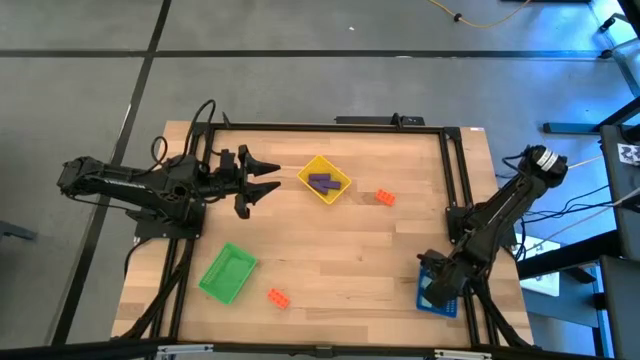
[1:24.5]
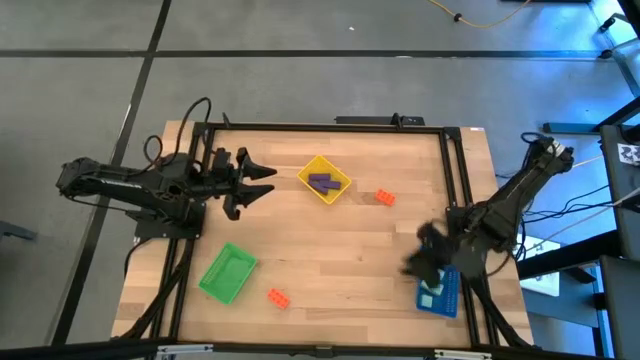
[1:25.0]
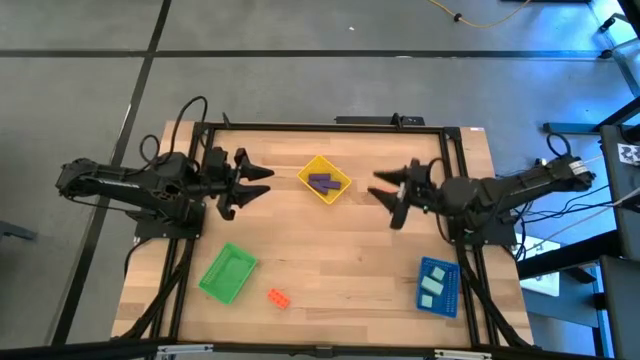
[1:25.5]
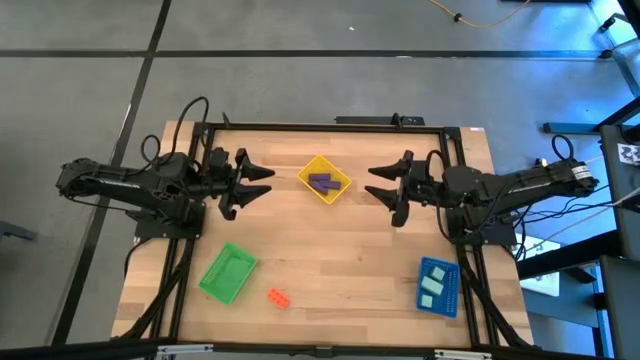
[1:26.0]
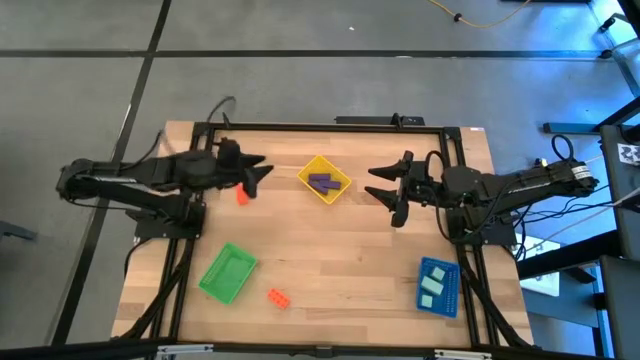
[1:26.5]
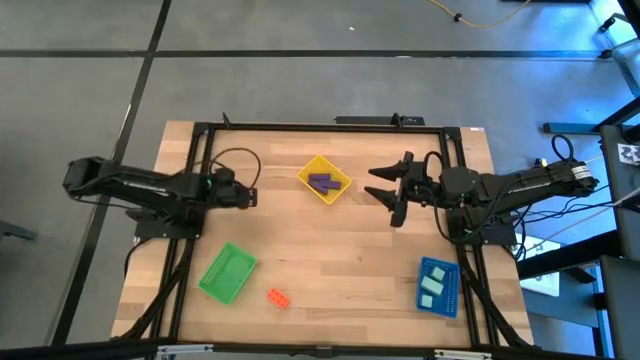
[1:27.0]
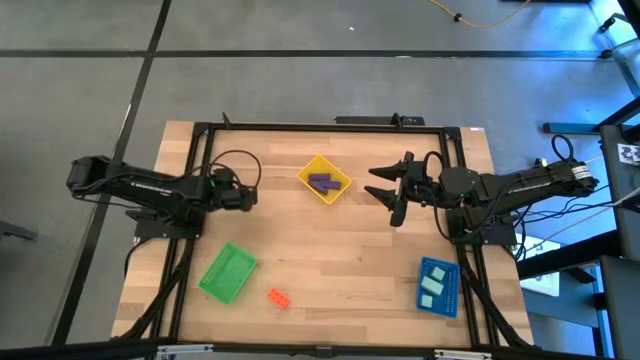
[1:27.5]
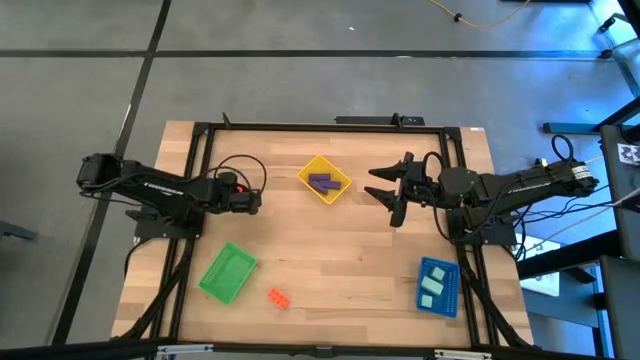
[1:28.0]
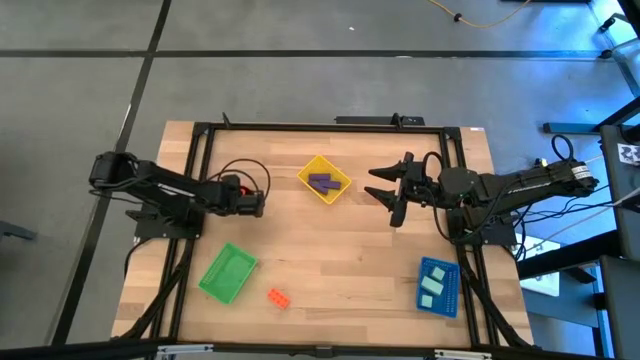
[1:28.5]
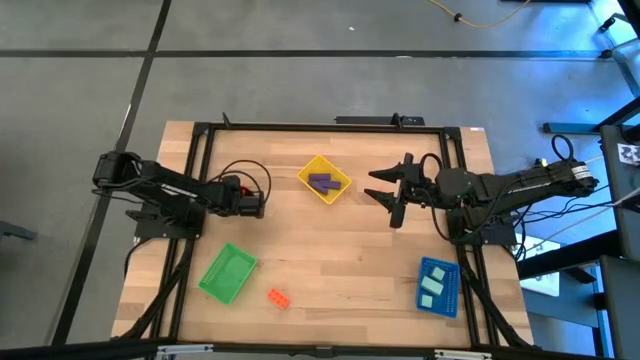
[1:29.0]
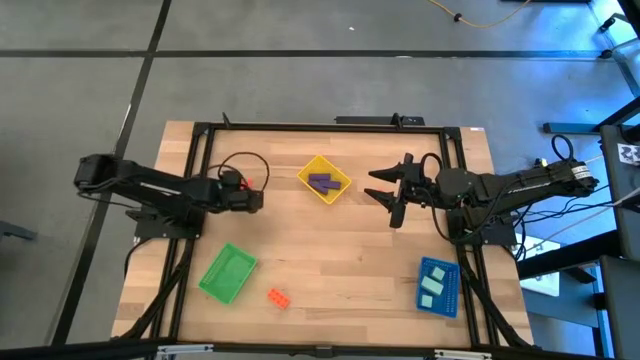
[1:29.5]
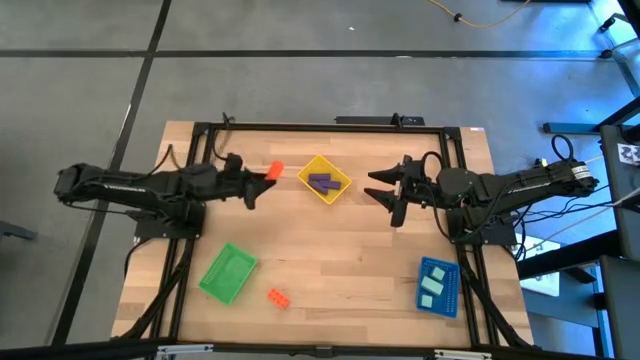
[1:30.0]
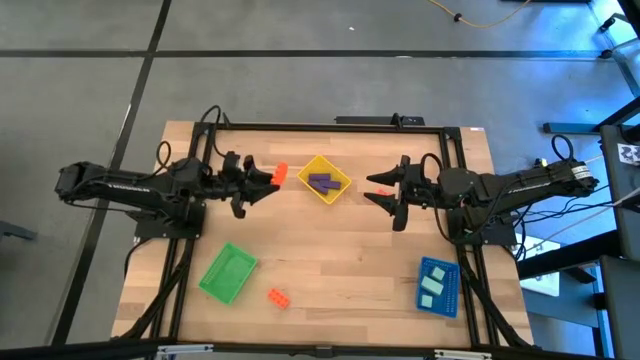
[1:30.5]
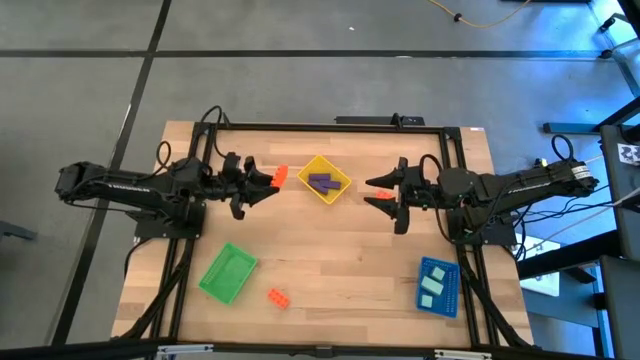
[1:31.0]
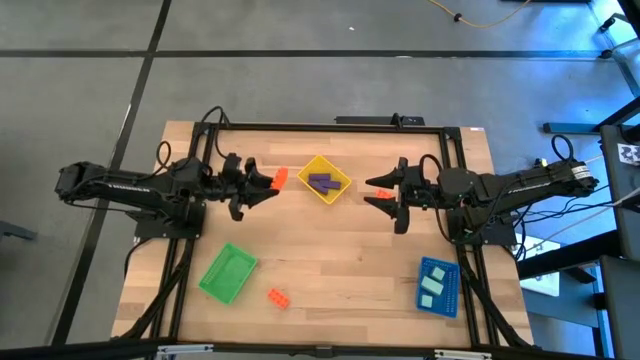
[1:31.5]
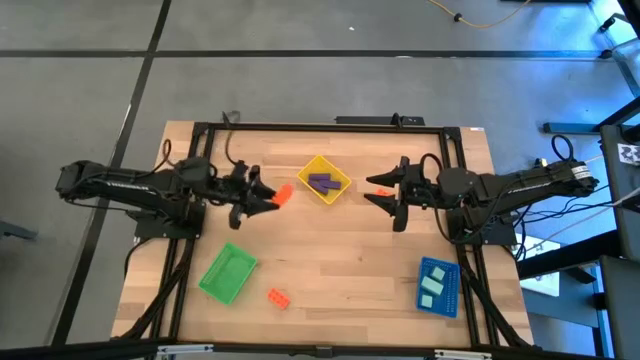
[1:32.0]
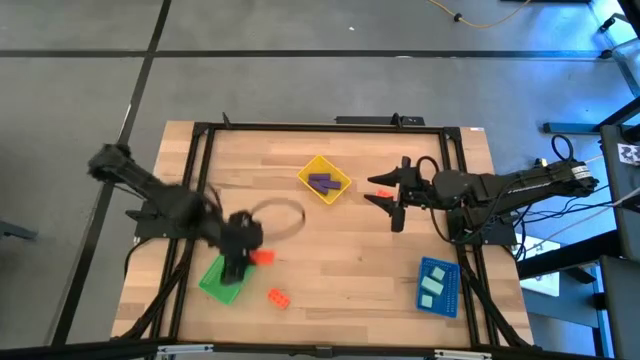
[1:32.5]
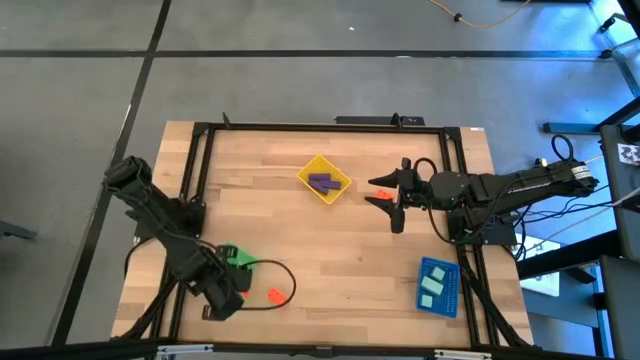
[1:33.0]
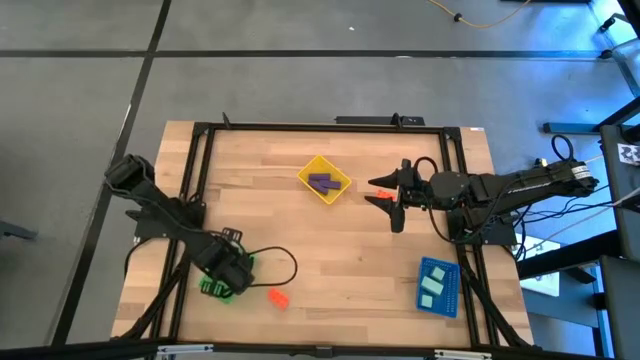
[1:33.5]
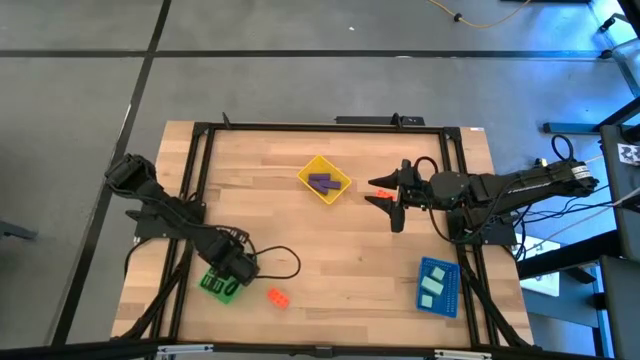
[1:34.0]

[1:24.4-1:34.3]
Task: Sort & place blocks by color
Put the top left orange game piece into the green bin

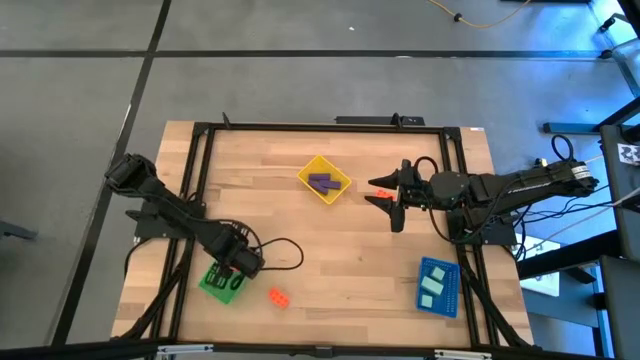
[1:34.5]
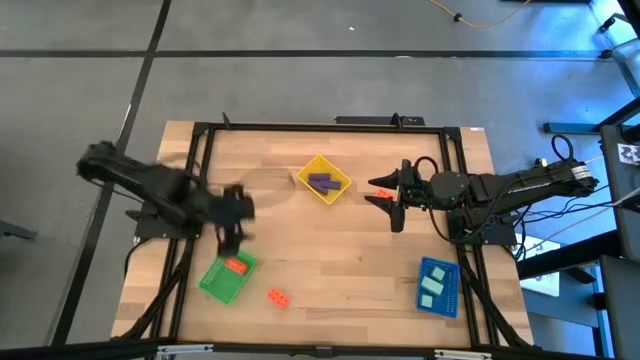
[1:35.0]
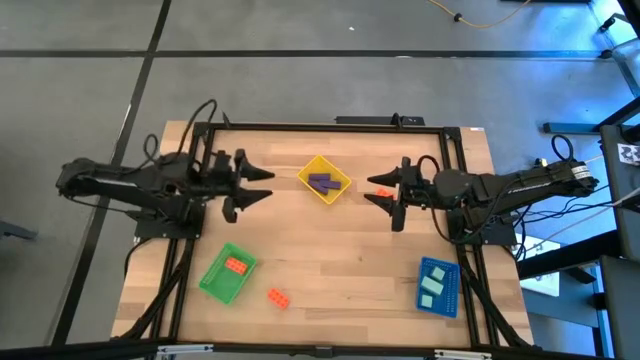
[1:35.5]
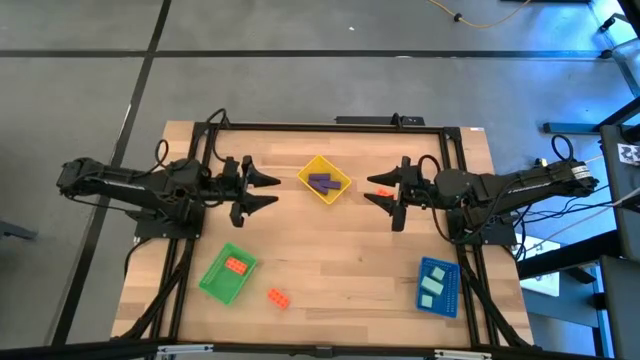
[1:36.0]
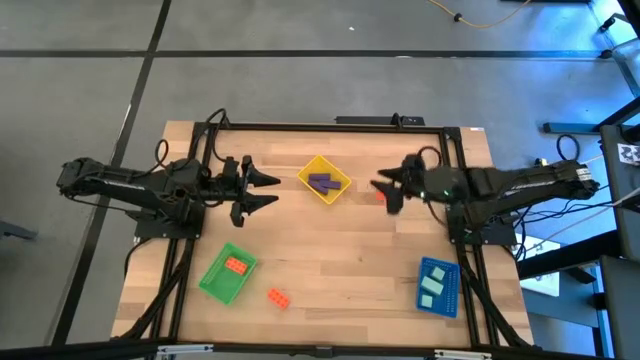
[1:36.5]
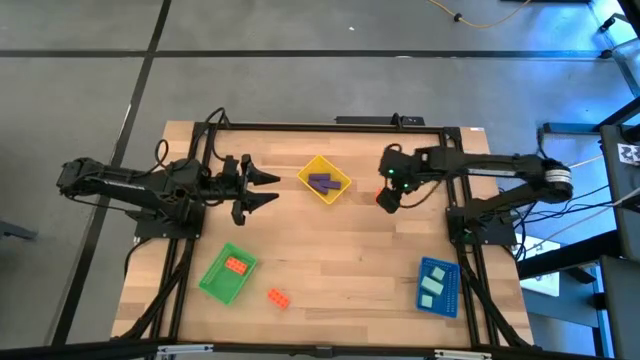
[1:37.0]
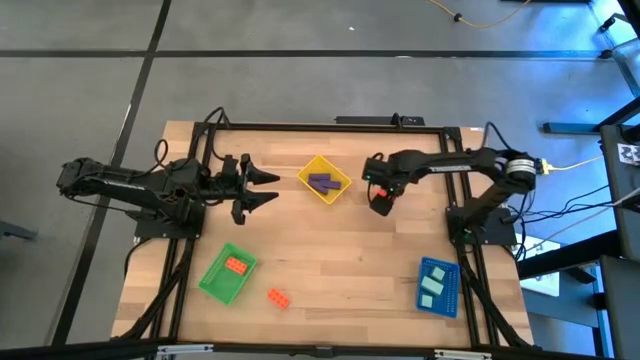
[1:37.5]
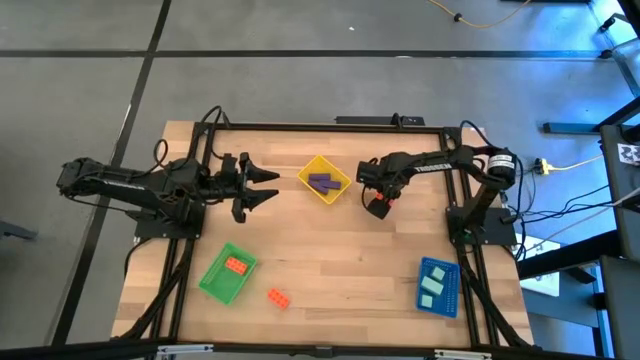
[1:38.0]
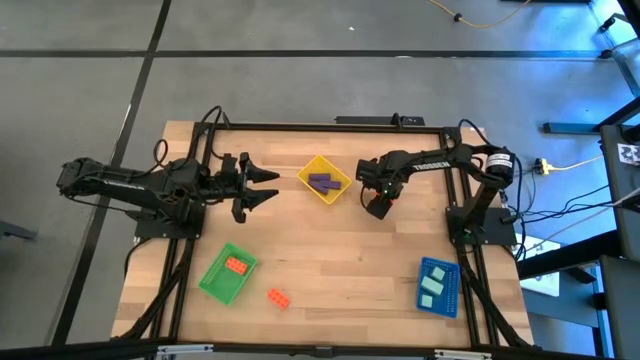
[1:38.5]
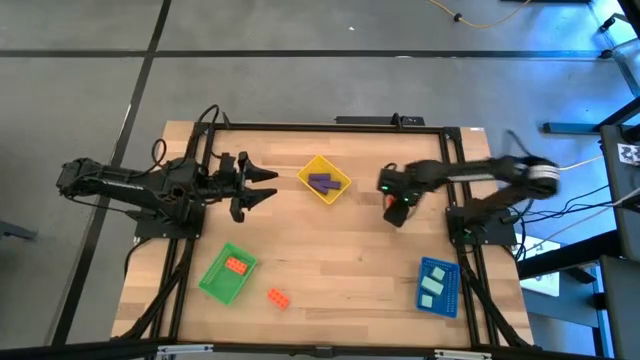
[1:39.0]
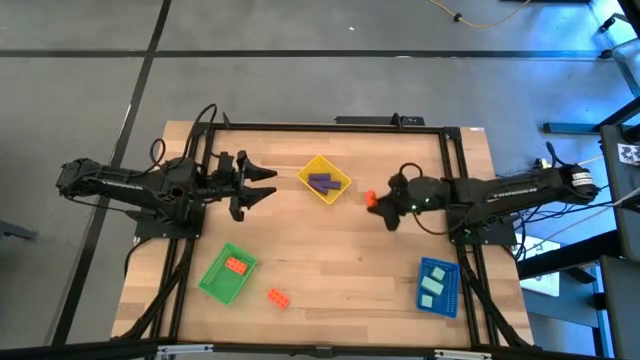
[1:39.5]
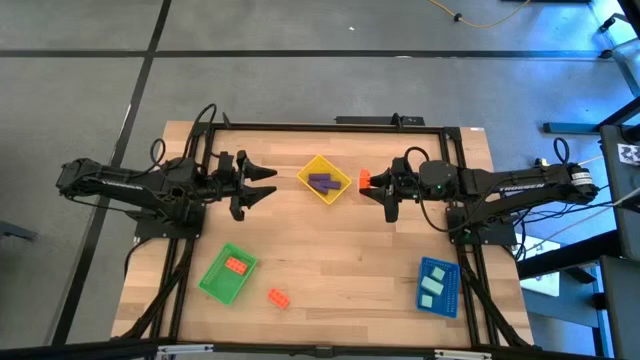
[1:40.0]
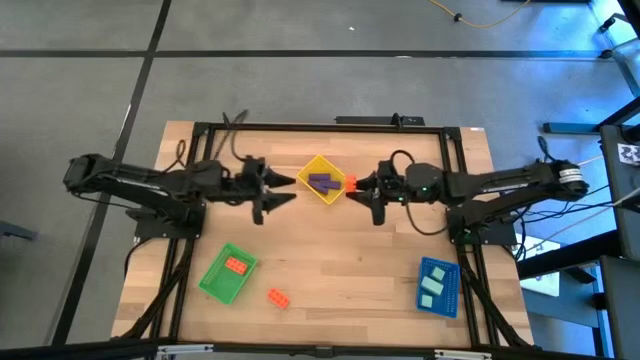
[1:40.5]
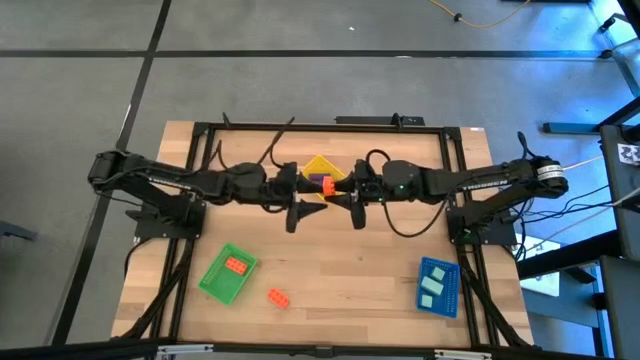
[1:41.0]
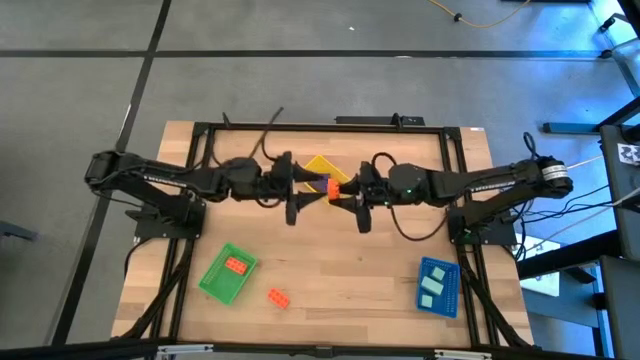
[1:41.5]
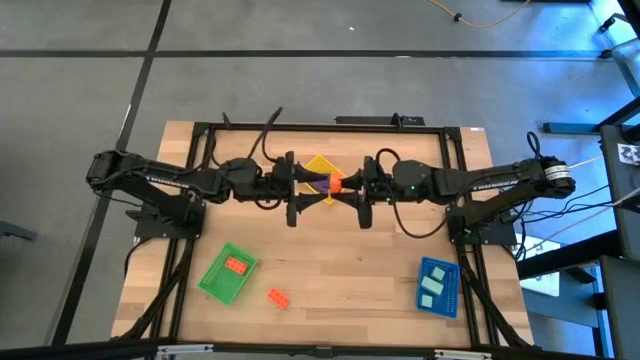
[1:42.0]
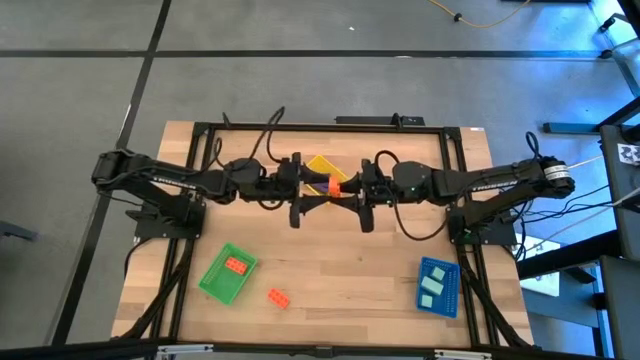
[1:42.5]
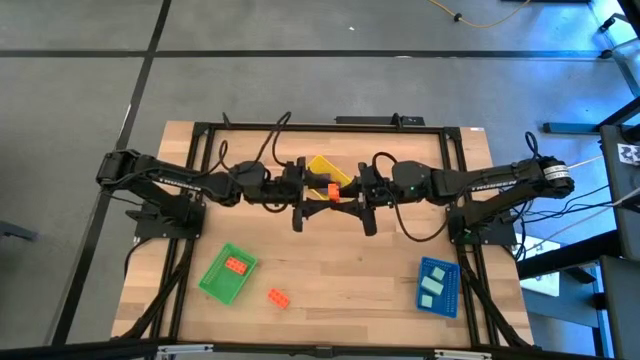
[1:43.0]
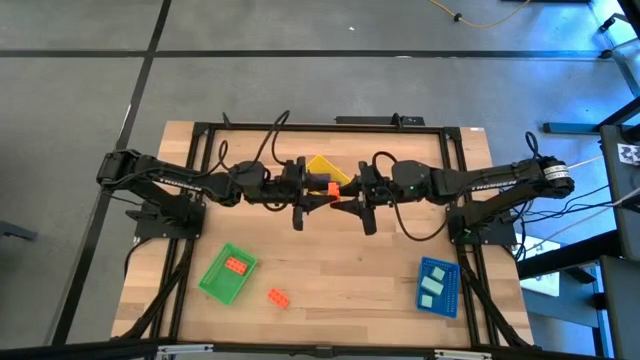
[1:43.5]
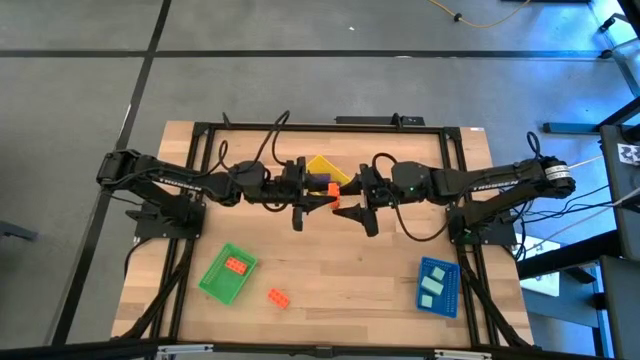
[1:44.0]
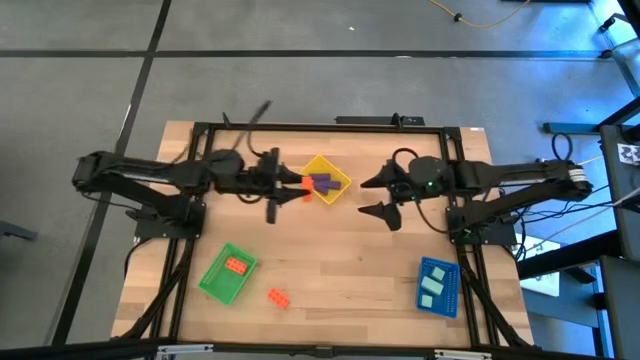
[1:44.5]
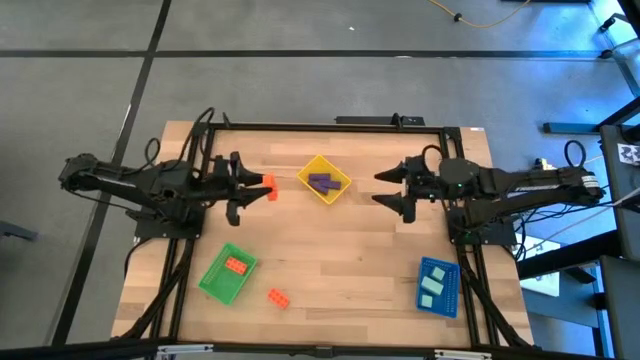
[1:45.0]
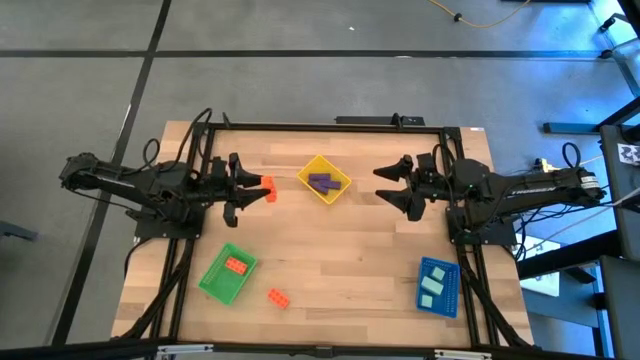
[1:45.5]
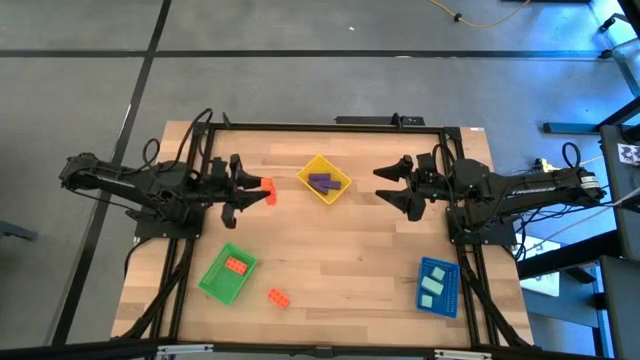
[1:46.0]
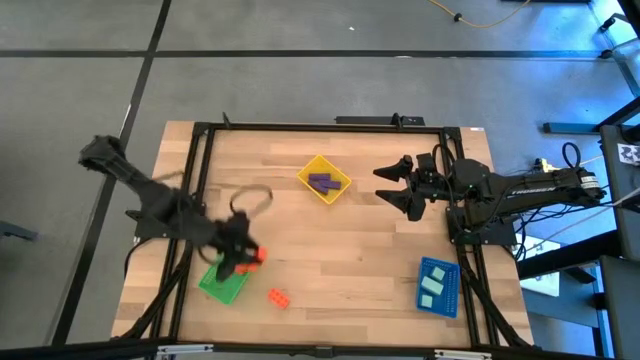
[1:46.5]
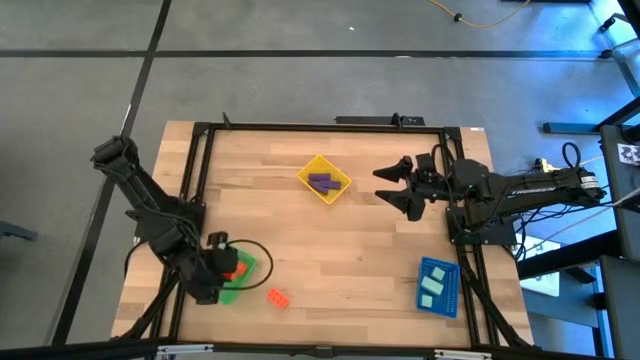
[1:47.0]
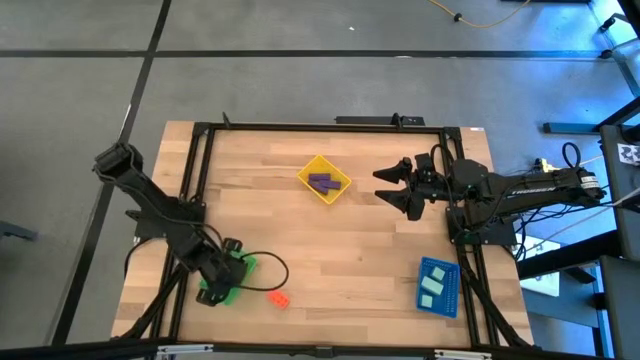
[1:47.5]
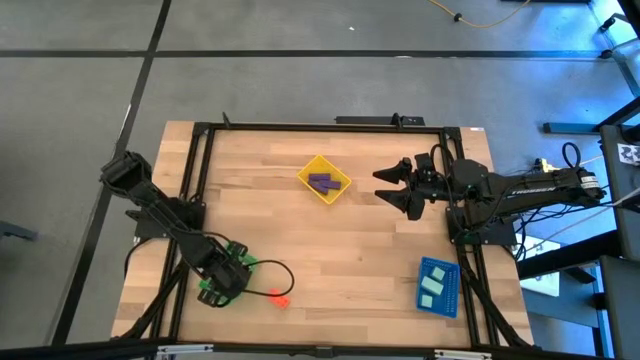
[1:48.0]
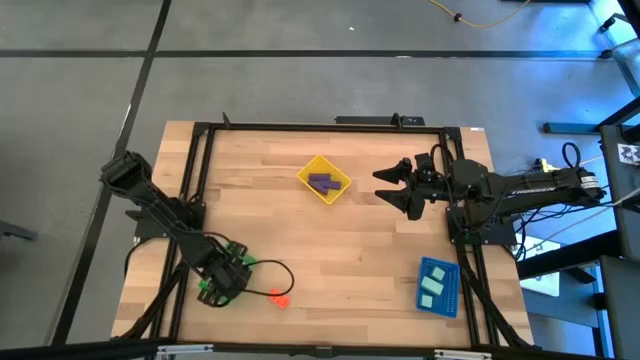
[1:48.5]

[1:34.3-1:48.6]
Put the top orange game piece into the green bin
